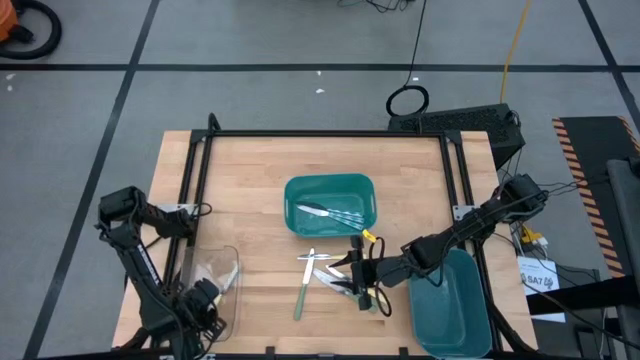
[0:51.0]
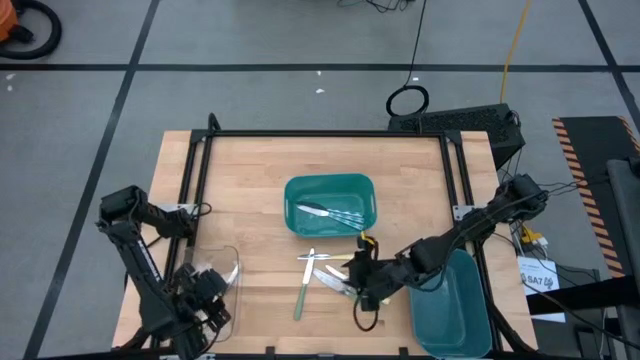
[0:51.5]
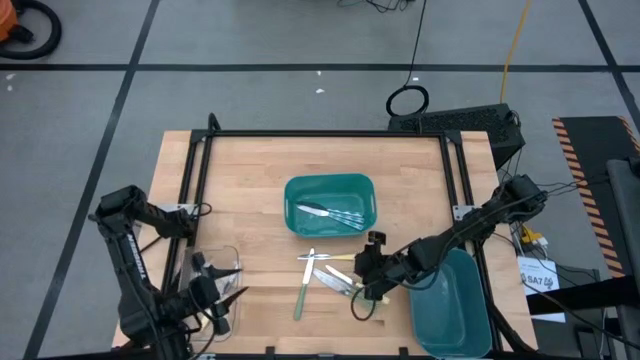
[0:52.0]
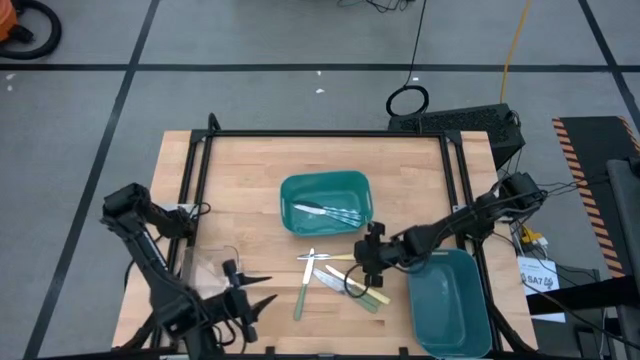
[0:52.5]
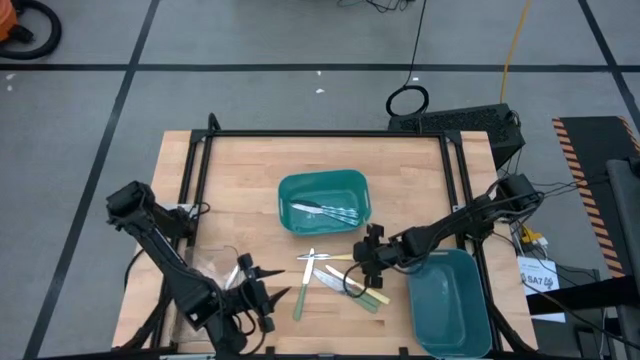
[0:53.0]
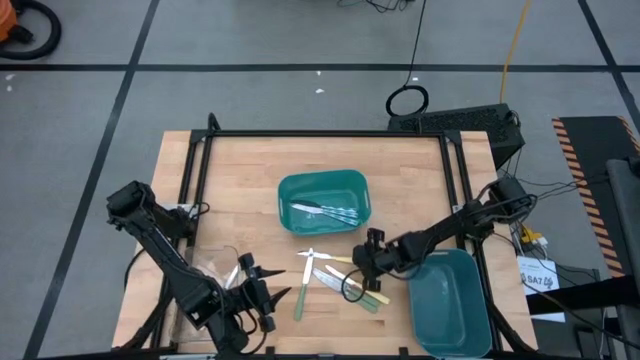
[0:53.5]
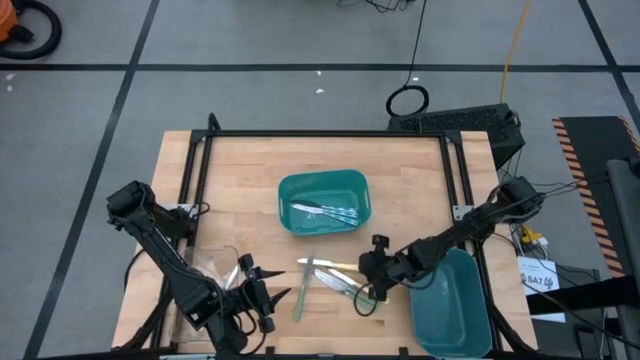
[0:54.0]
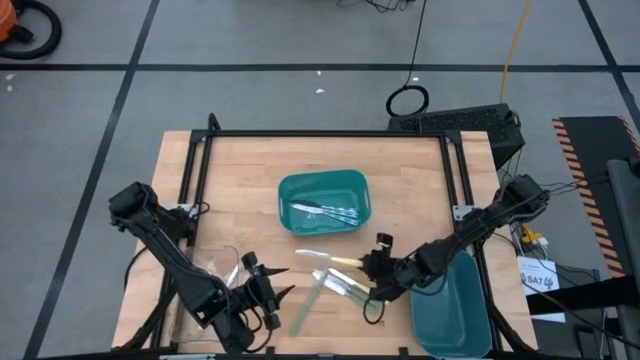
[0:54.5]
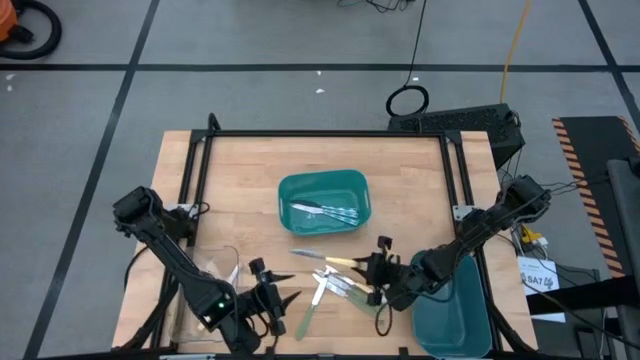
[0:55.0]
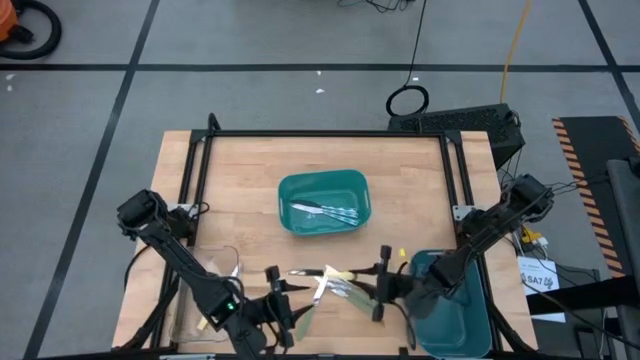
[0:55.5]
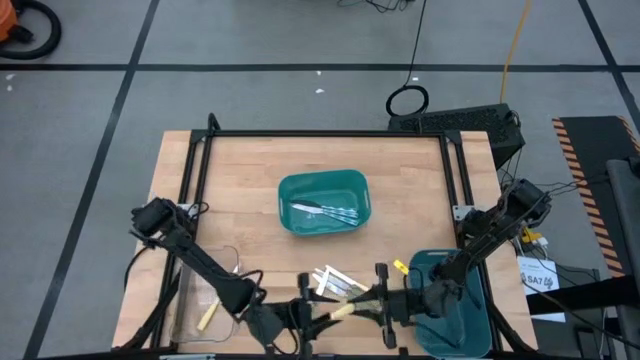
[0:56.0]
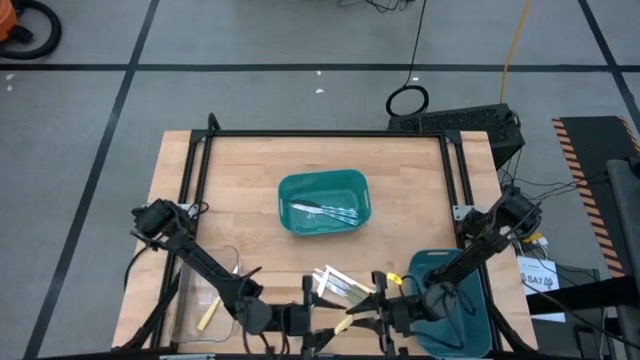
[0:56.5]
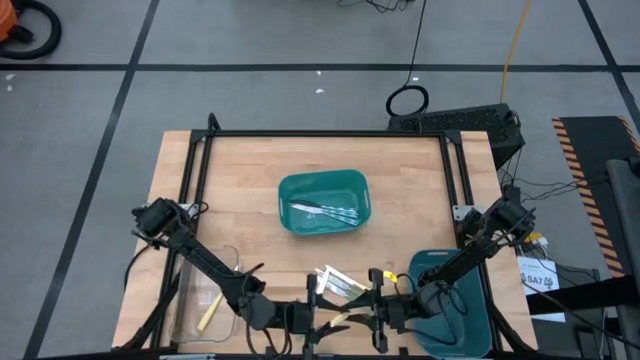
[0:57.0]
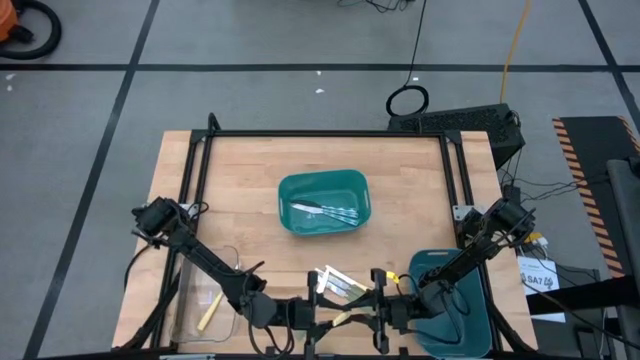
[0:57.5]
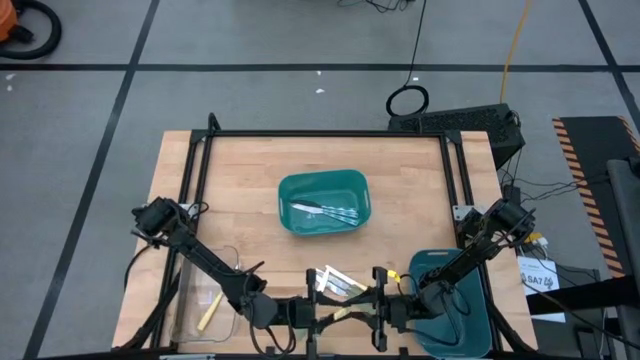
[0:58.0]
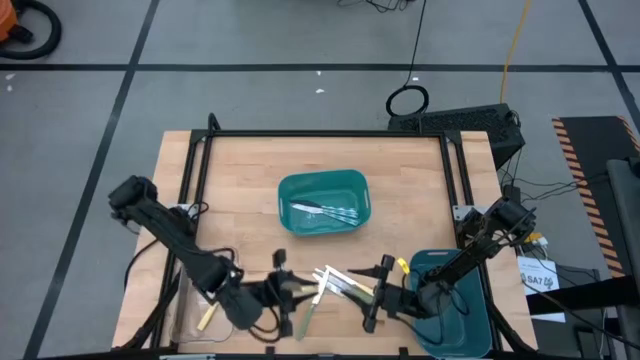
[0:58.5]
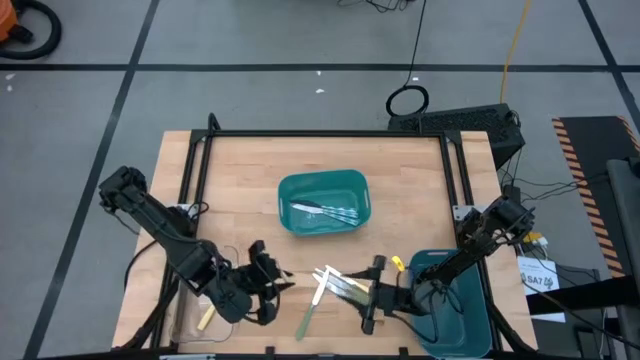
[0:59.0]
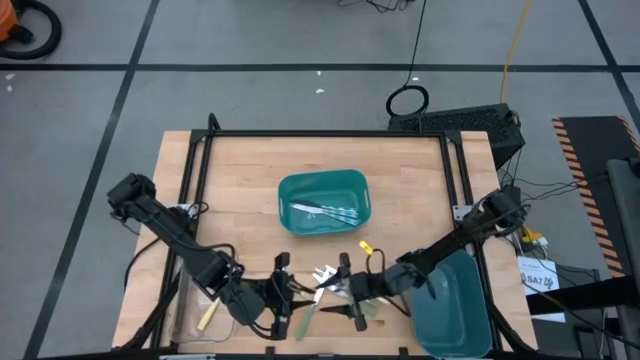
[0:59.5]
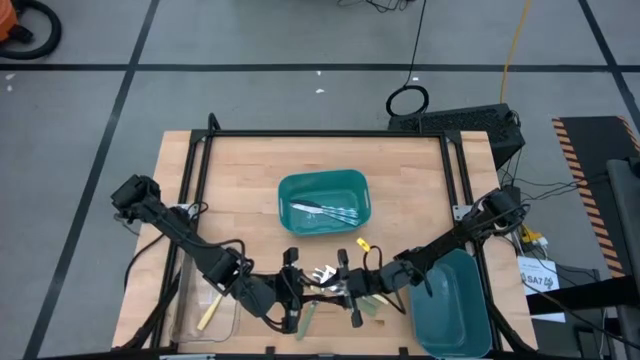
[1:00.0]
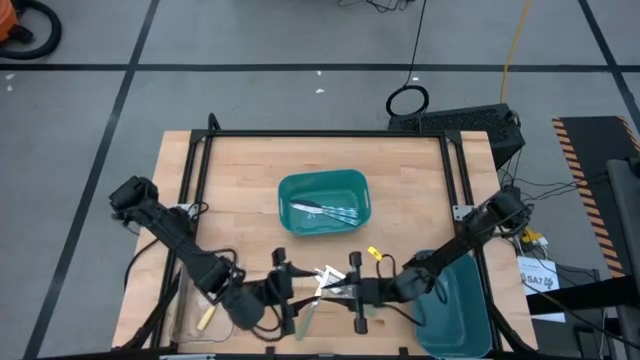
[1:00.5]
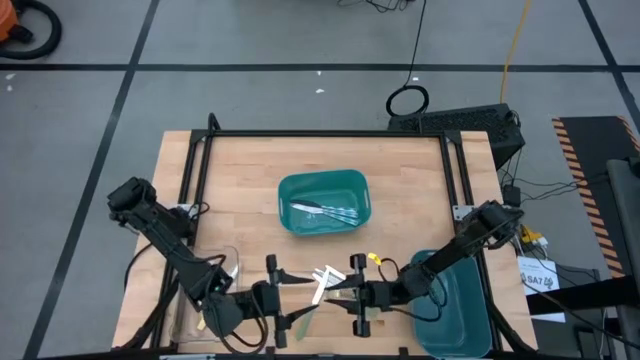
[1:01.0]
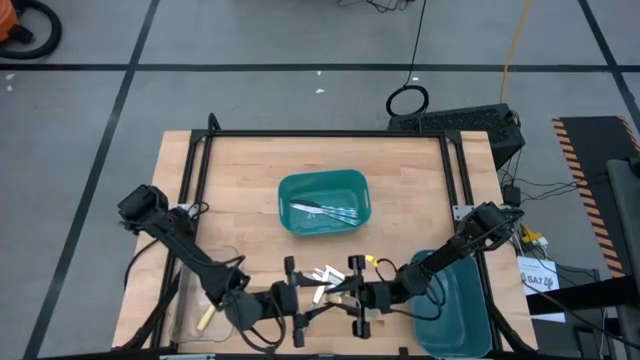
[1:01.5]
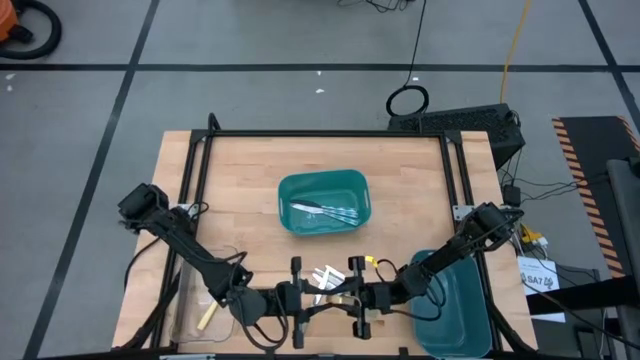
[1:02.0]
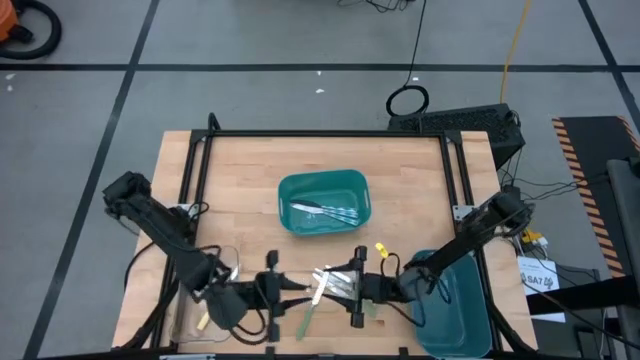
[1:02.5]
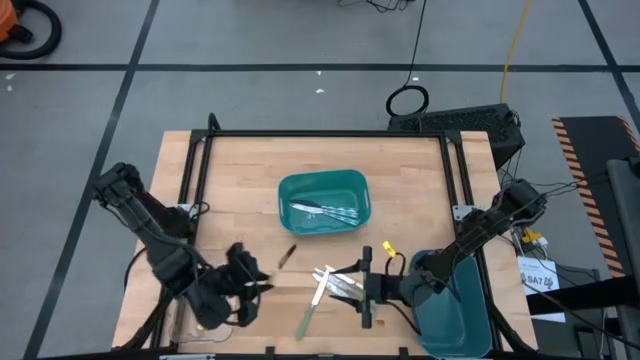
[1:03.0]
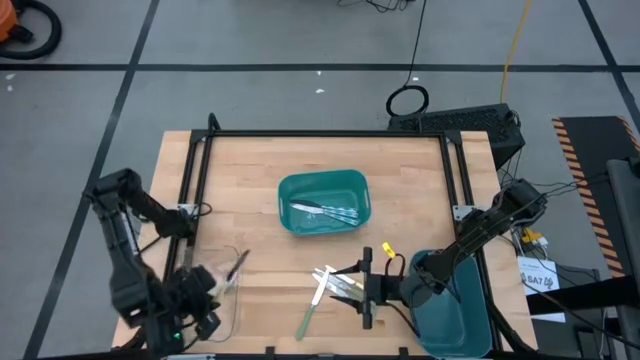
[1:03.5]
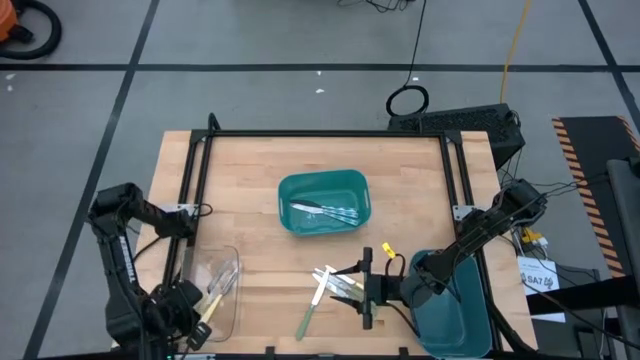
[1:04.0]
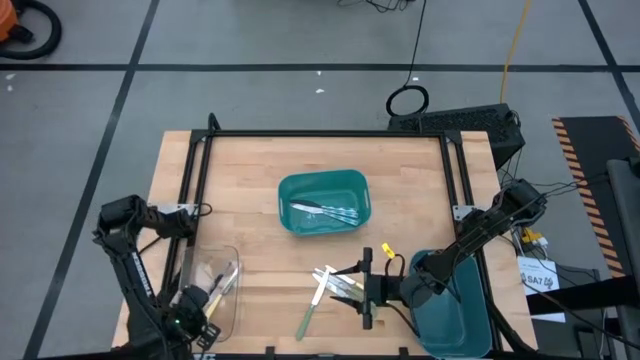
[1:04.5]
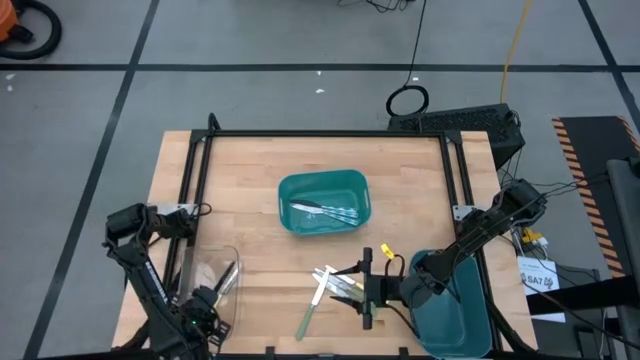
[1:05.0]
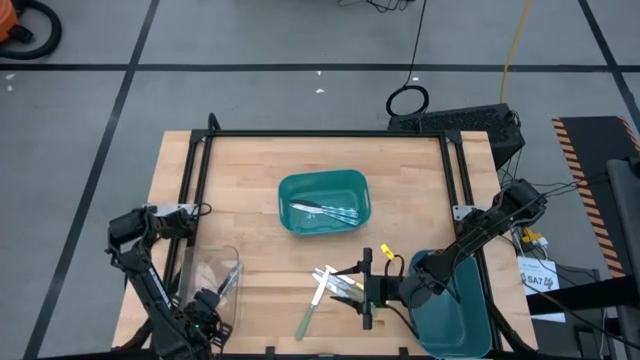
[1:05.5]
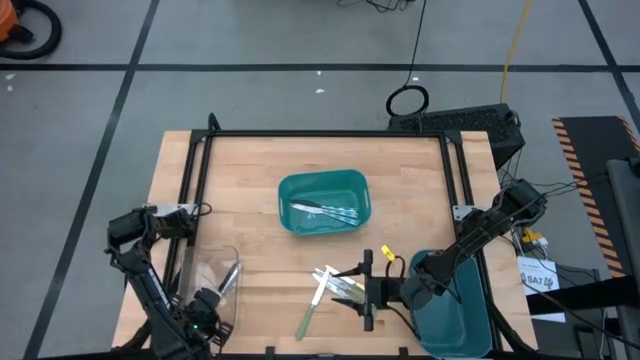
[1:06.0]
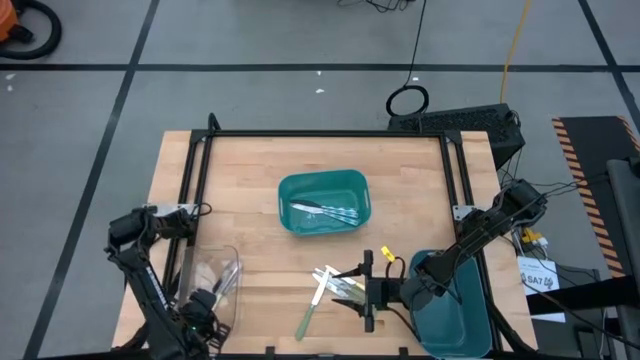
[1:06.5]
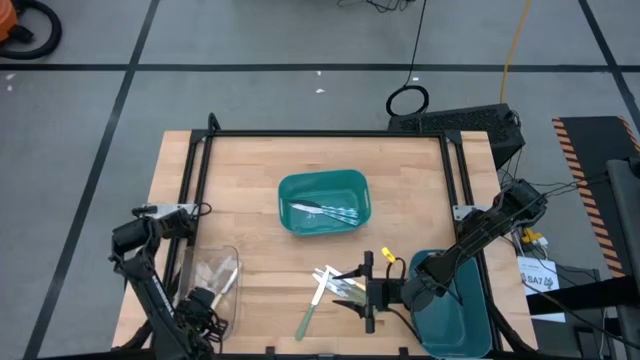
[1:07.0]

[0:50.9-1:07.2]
Task: Sort silverware by color (type)
Put the top yellow knife into the transparent bin

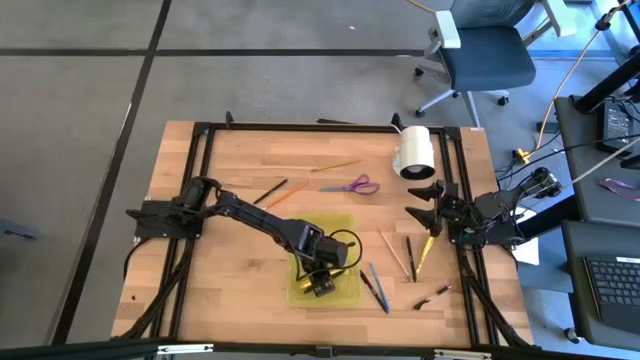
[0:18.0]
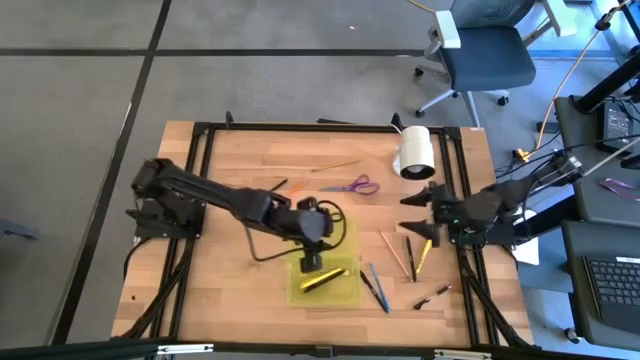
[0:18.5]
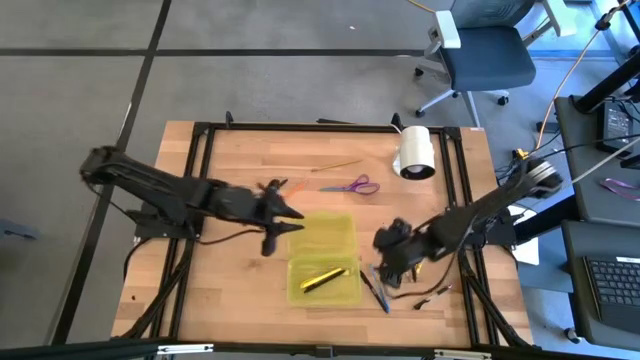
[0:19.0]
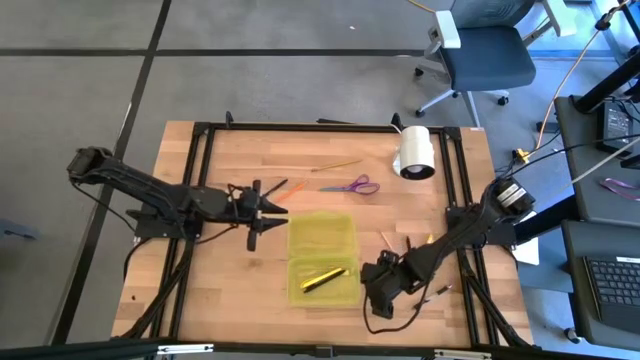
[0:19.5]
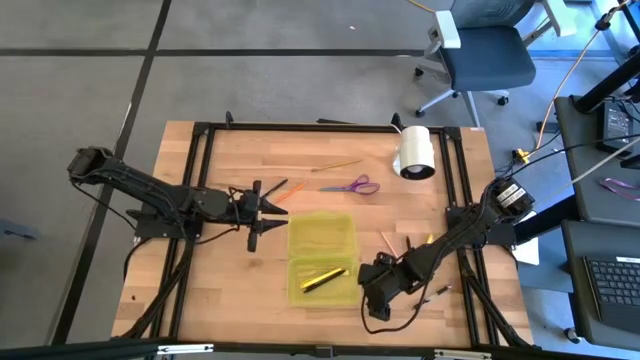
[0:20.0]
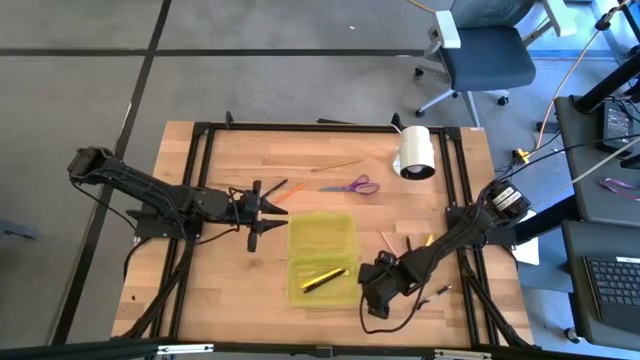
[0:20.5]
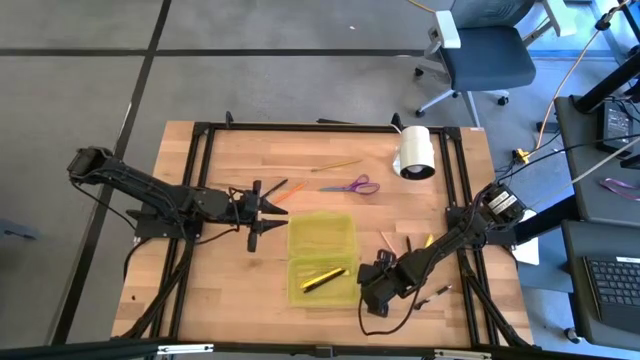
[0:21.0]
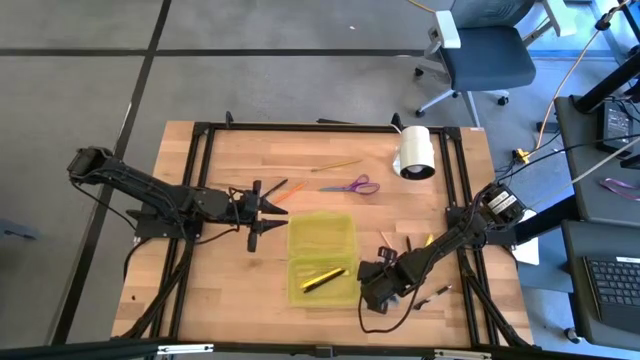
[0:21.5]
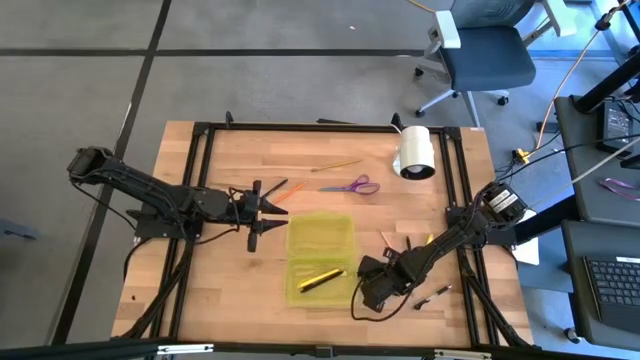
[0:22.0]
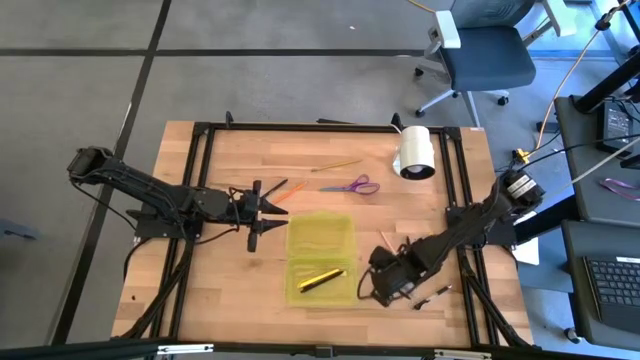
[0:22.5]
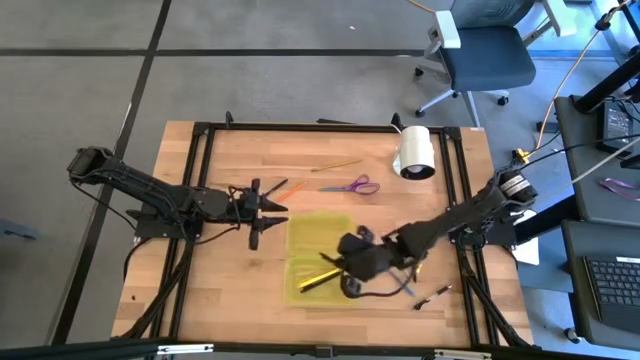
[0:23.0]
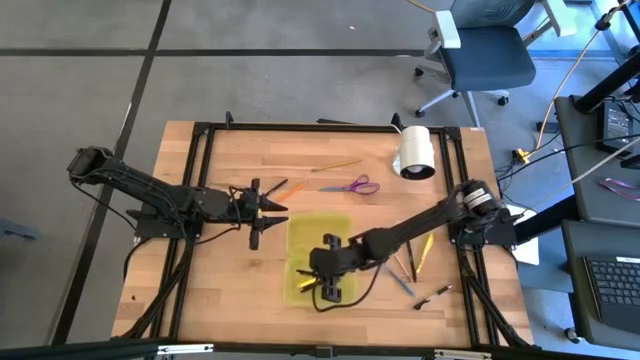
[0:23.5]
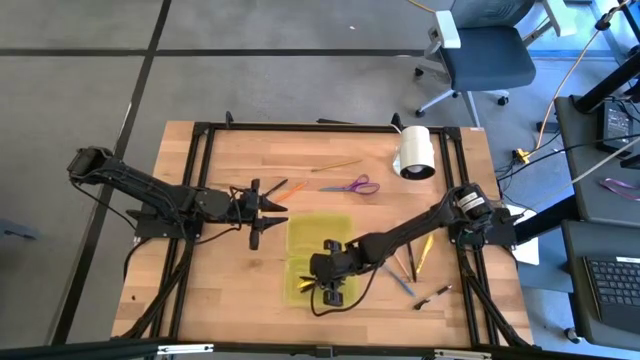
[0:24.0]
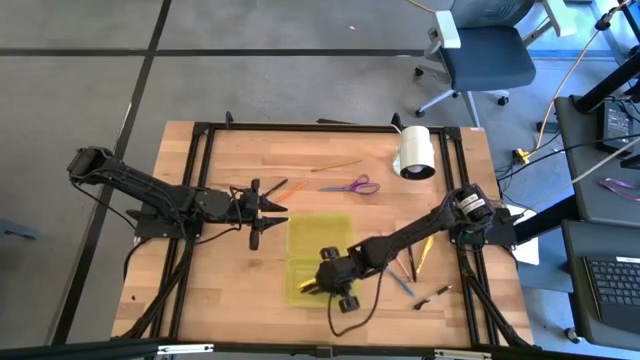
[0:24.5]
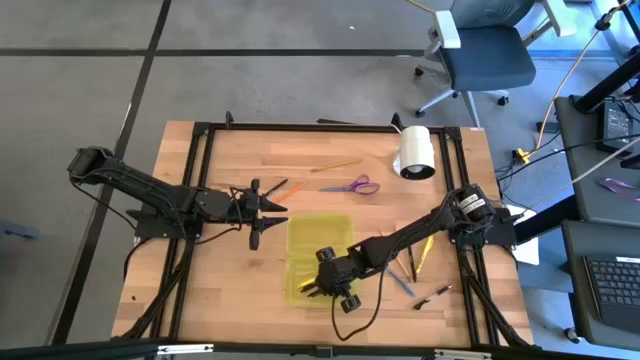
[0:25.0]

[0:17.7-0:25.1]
Task: Pick & place school supplies into a supply box
Put the black pen into the yellow supply box
